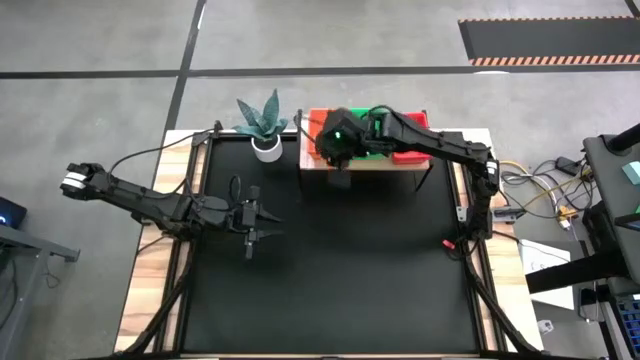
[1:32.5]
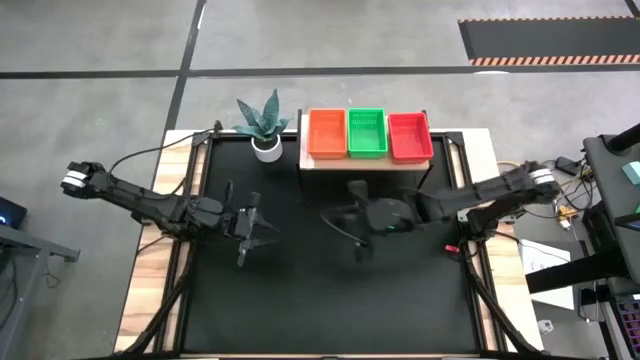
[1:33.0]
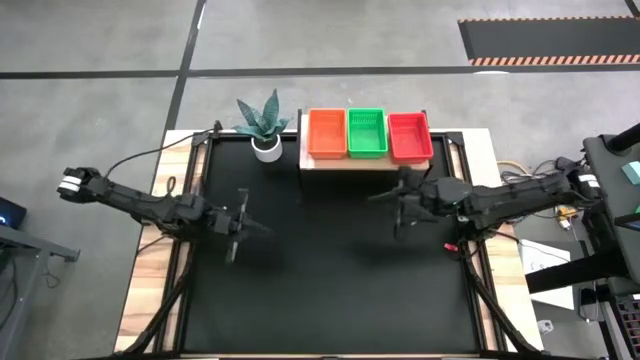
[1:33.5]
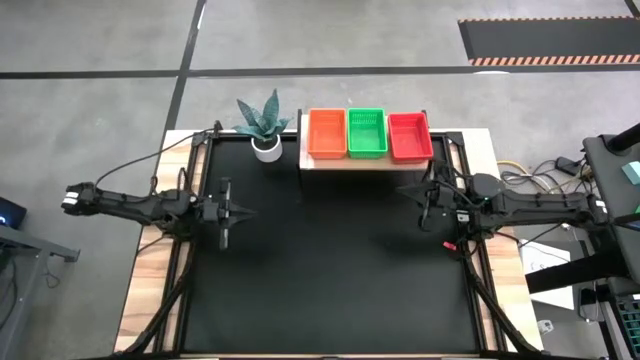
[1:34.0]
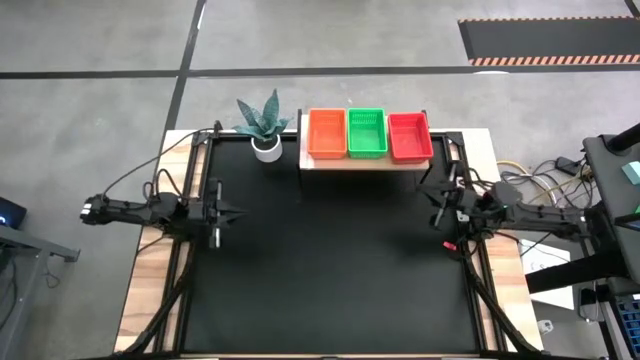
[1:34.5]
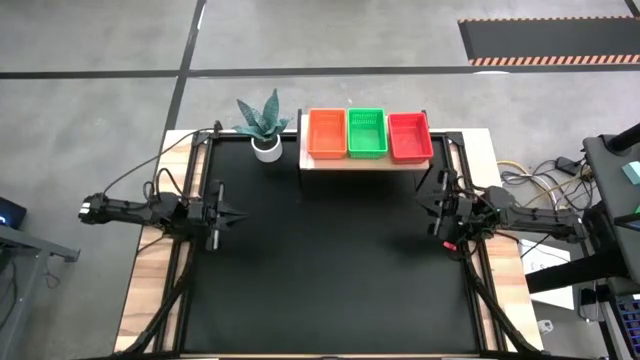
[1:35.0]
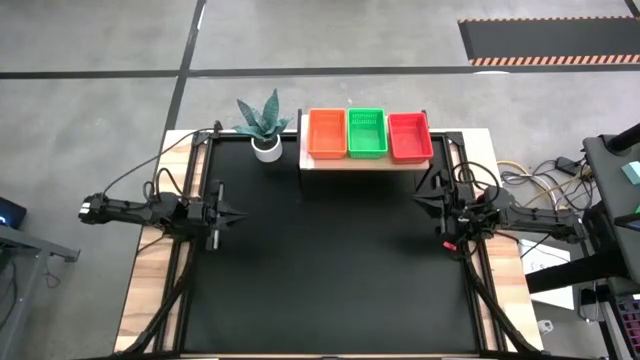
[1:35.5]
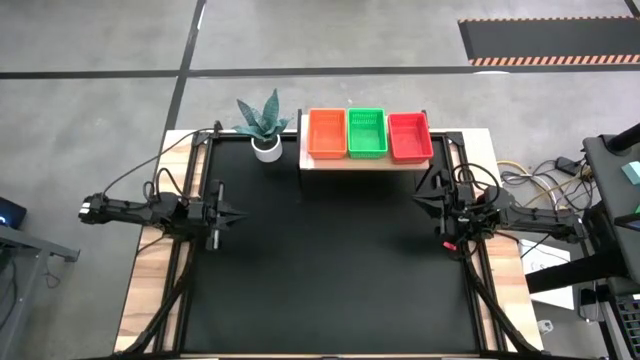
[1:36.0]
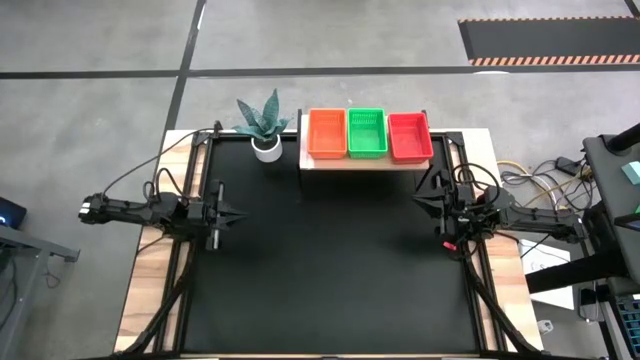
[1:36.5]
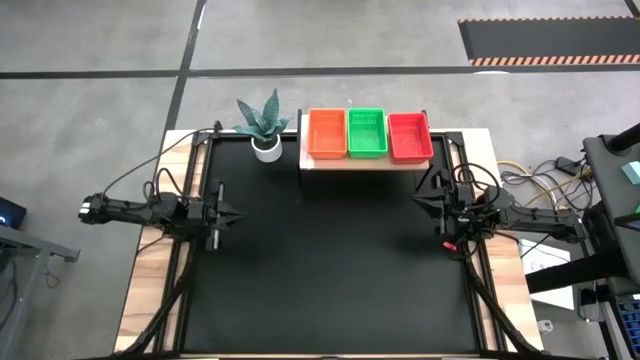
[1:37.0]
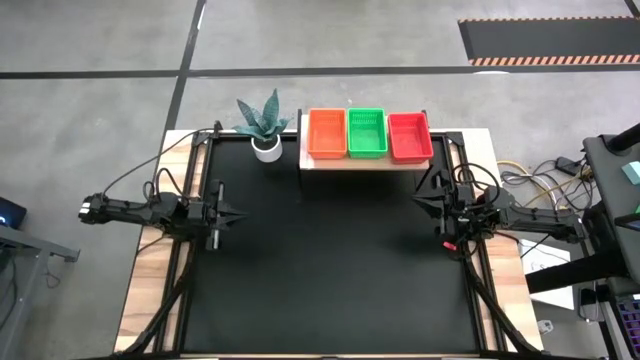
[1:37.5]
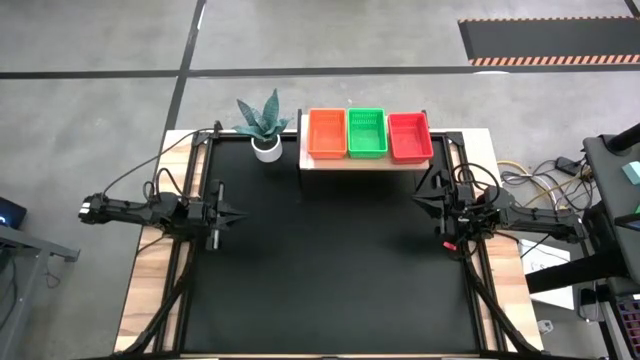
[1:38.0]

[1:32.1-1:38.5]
Task: Stack baskets on shelf by color
Return to Home Position

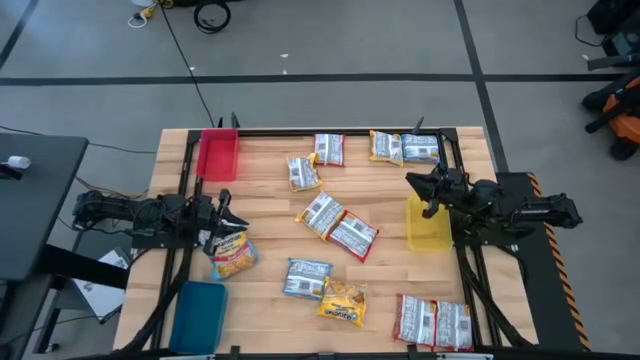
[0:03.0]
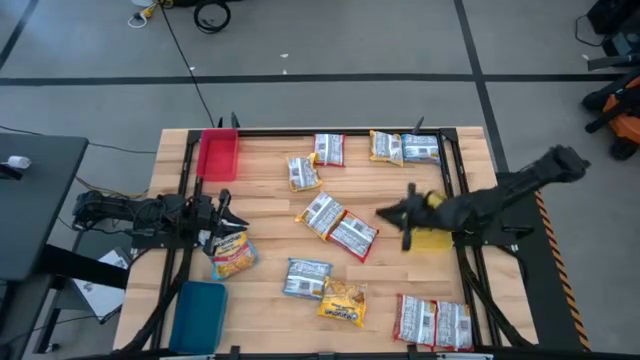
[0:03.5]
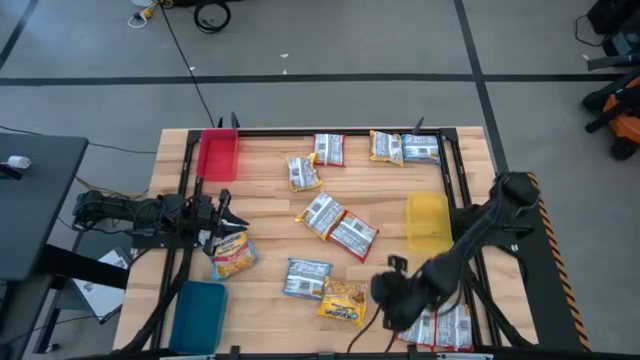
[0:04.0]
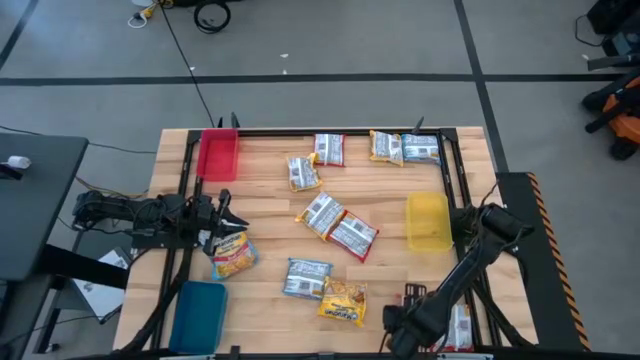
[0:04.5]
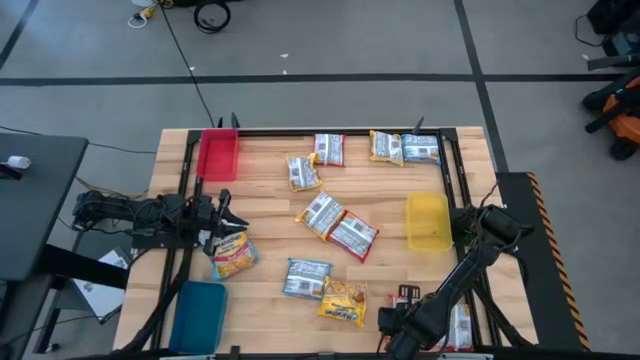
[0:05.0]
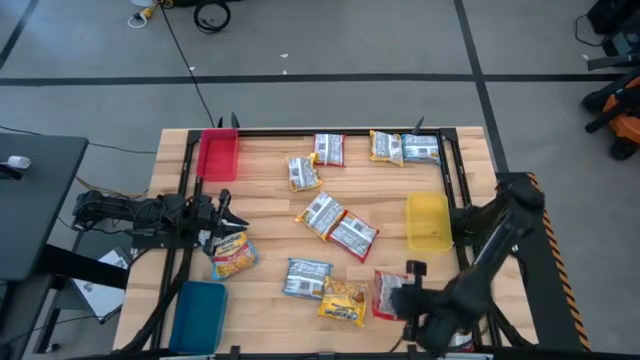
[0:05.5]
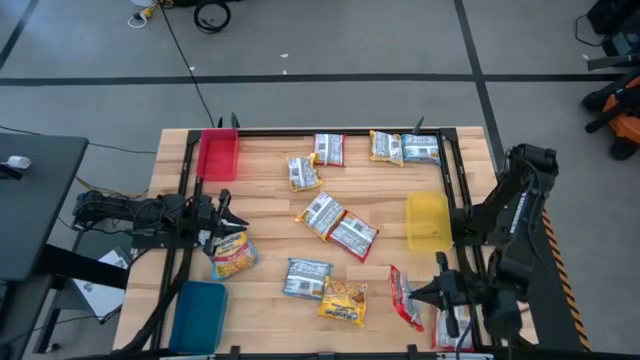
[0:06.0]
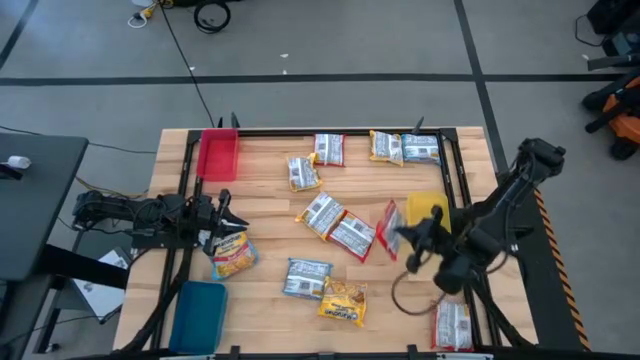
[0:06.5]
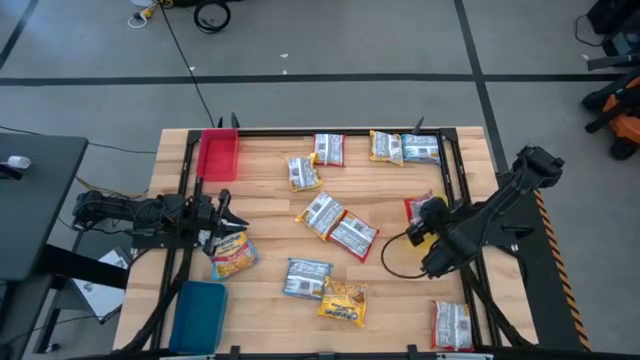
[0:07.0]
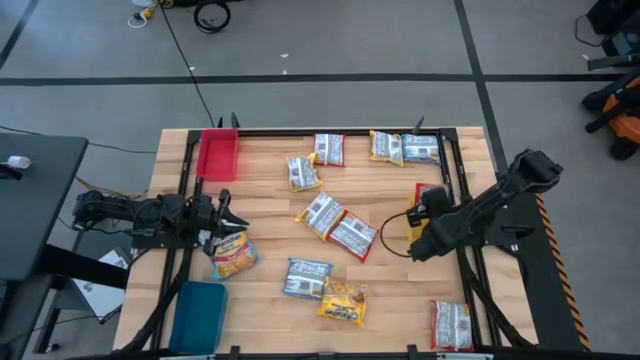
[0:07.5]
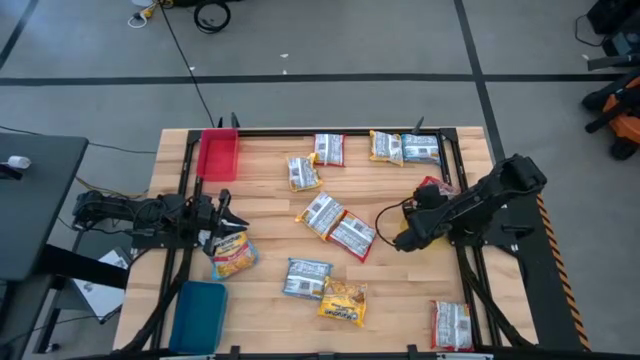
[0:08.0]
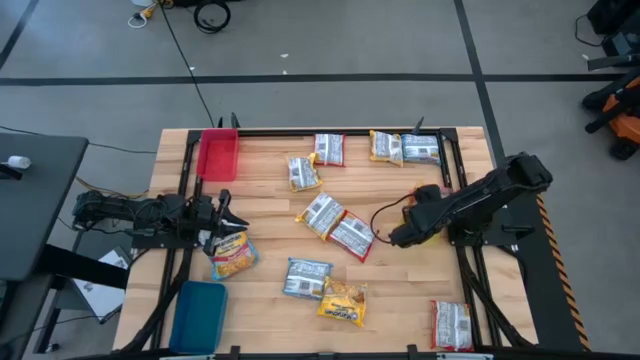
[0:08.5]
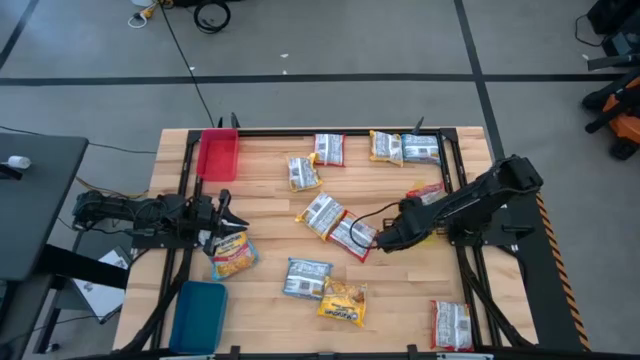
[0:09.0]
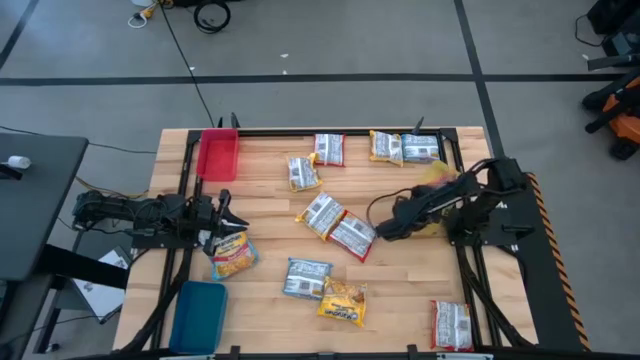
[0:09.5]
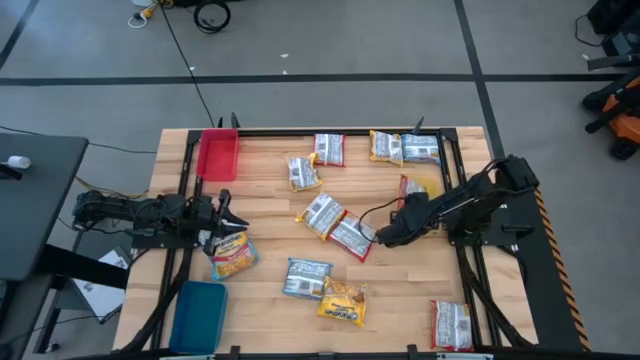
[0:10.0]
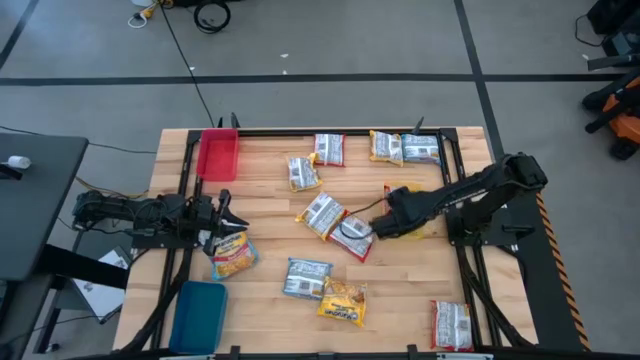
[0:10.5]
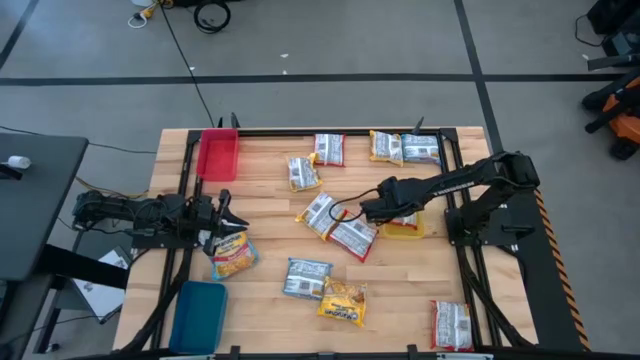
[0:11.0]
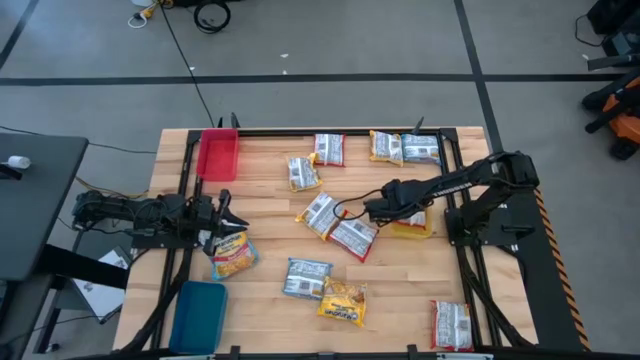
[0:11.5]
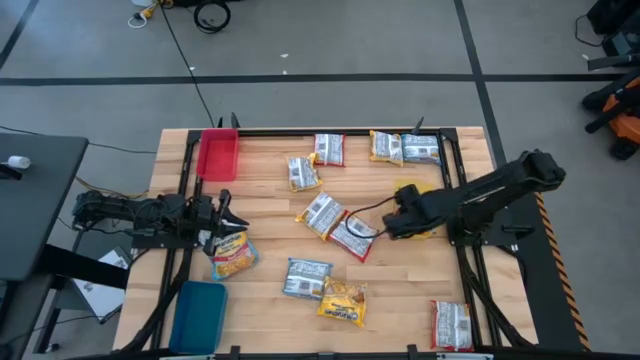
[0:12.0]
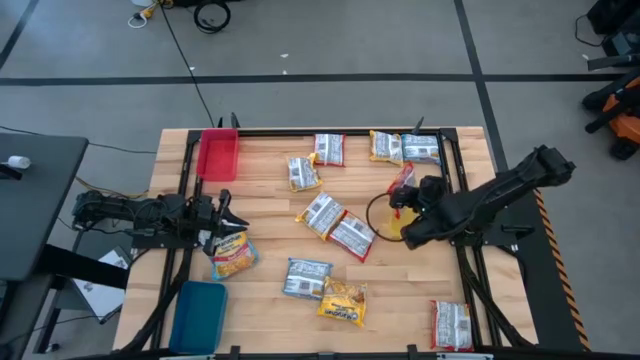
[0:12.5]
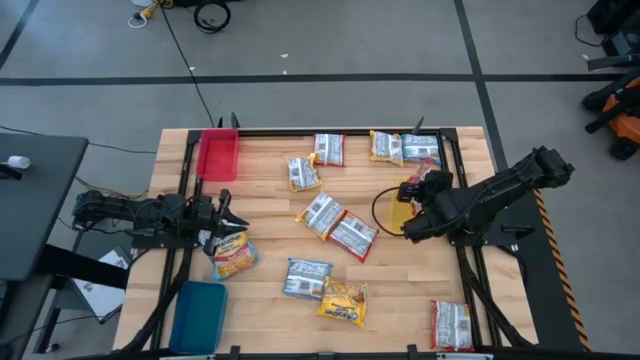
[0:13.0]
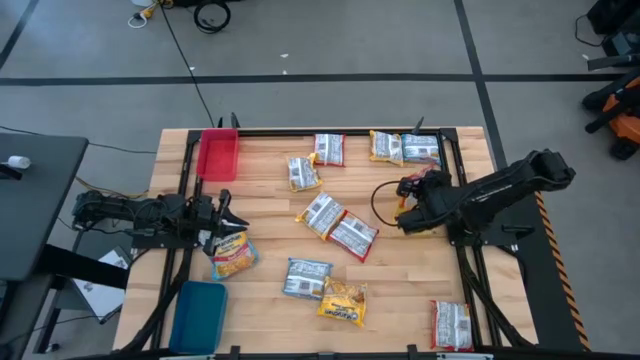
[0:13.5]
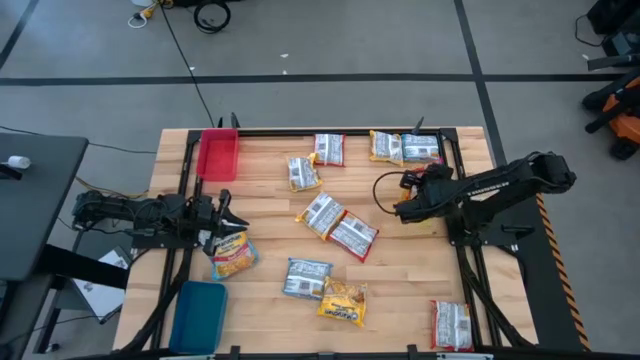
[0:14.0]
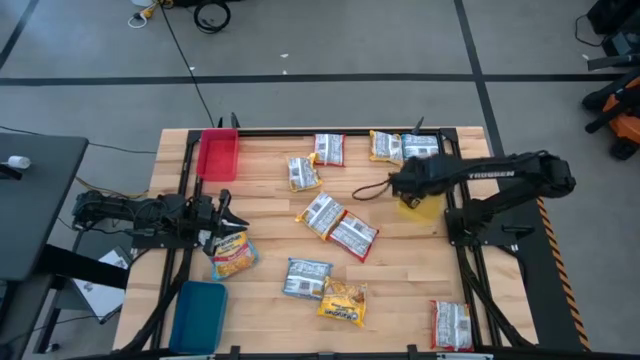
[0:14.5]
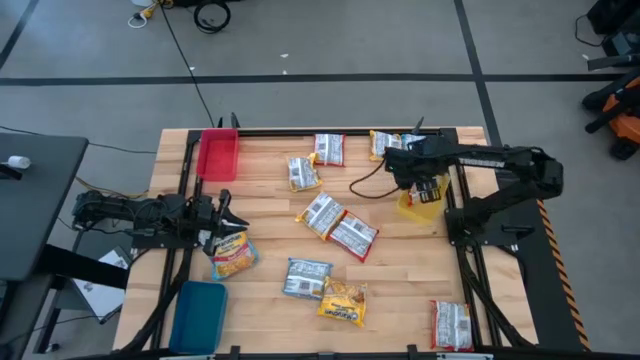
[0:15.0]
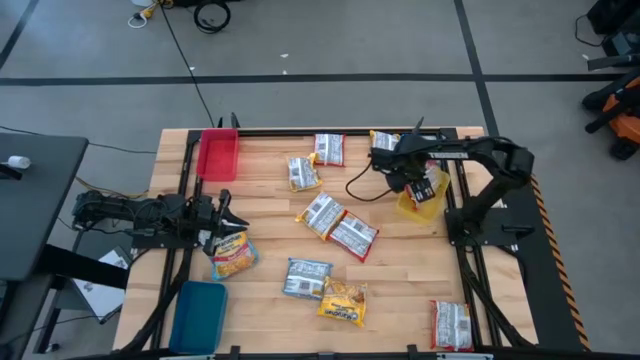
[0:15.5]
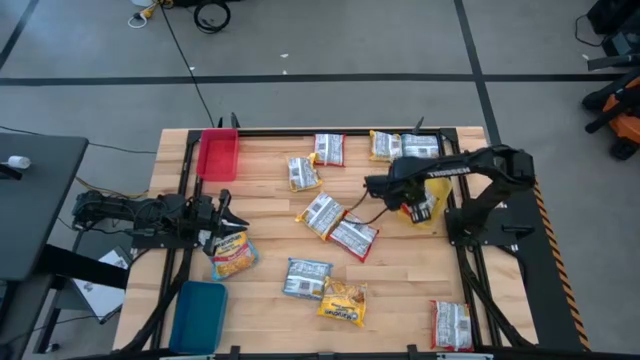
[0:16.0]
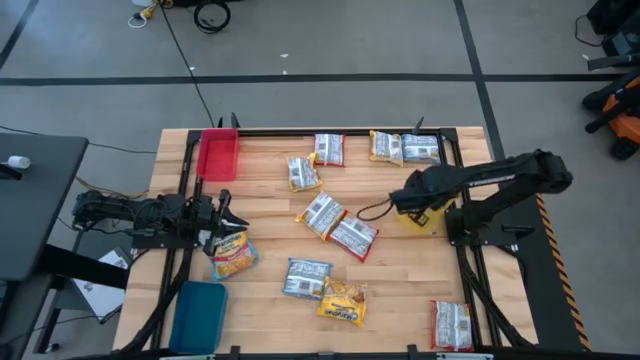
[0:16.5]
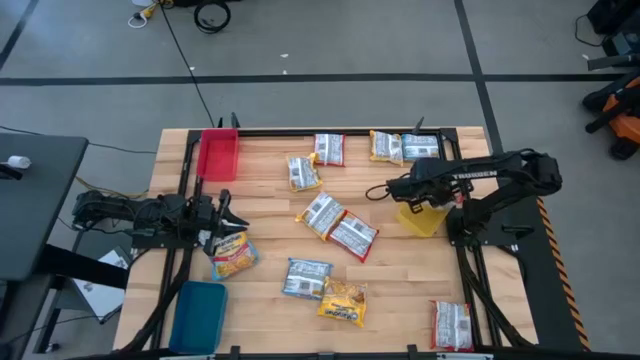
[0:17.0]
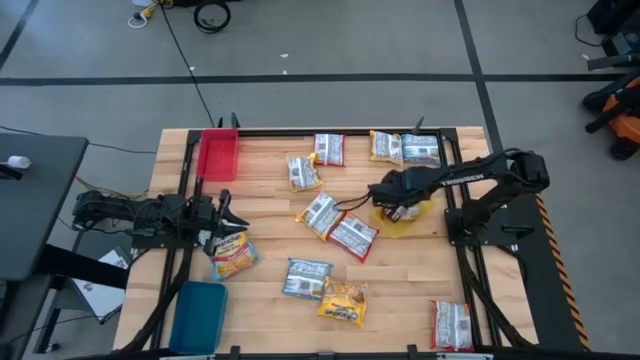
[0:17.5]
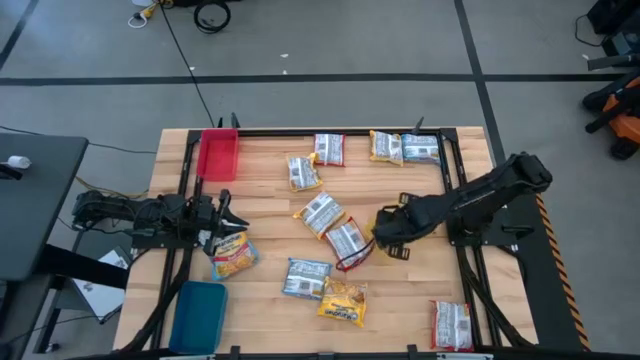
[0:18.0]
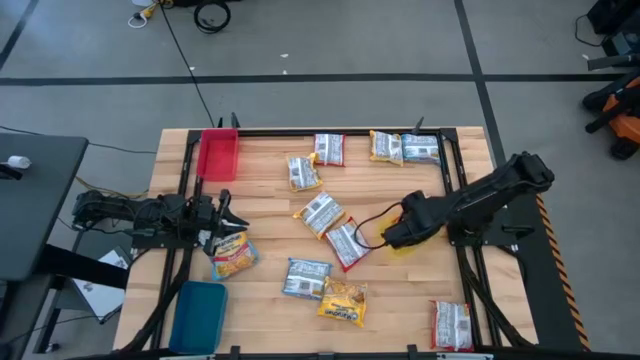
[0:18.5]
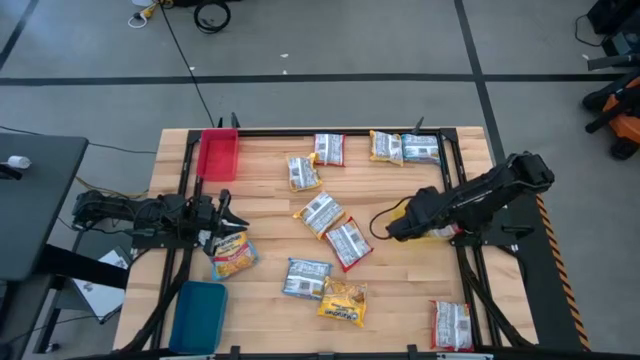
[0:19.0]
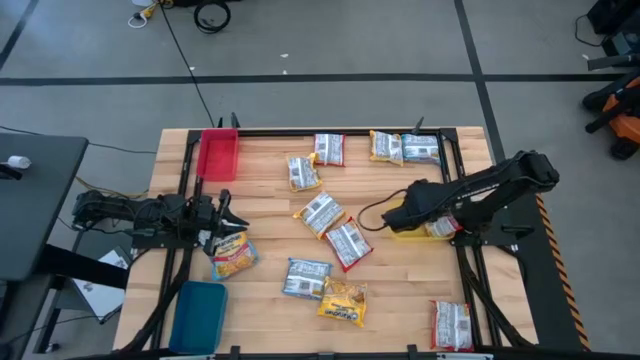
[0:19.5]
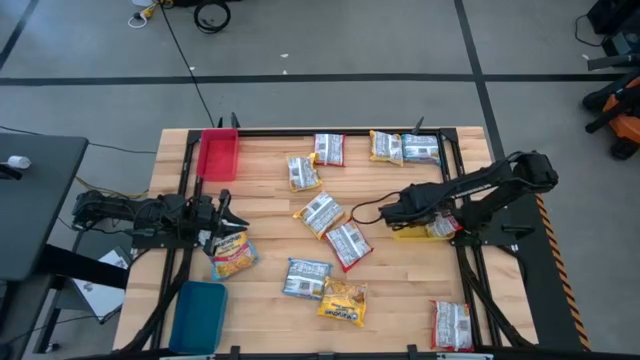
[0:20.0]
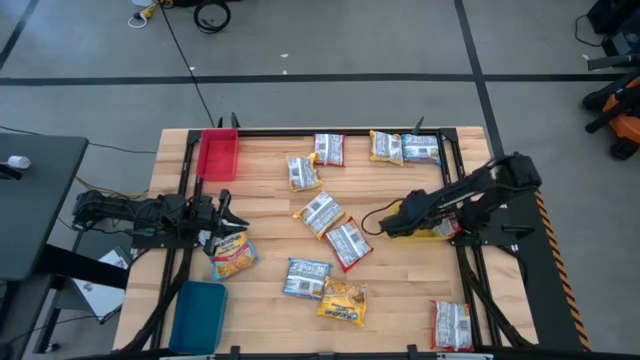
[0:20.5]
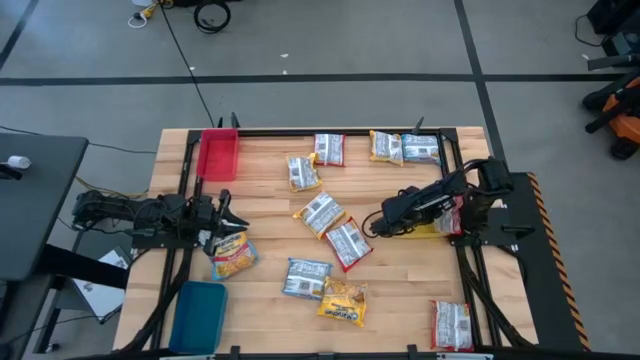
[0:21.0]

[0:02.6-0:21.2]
Task: Sort Maruchan noodles
Put the red noodle pack into the yellow bin
